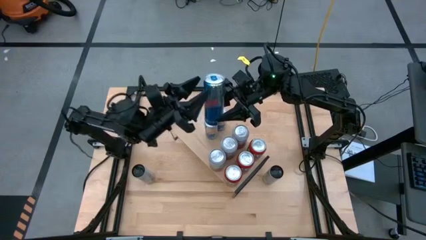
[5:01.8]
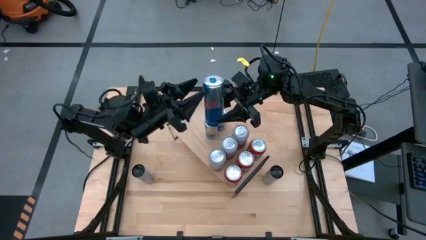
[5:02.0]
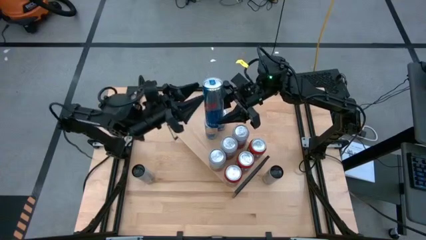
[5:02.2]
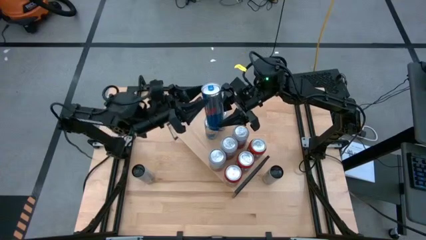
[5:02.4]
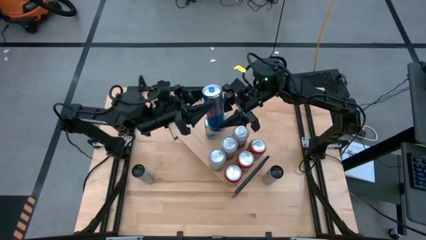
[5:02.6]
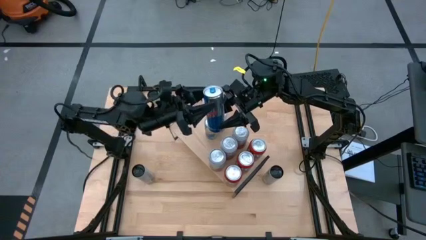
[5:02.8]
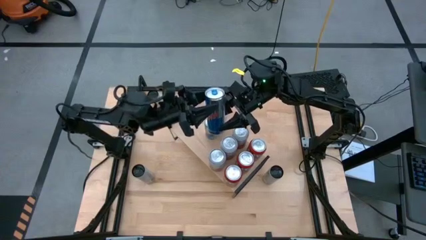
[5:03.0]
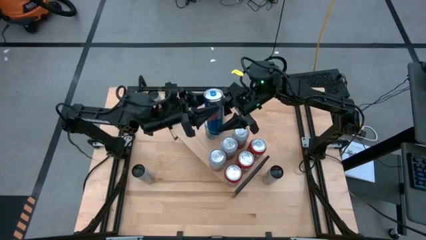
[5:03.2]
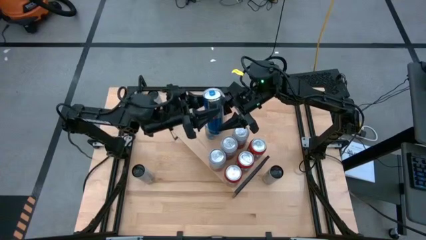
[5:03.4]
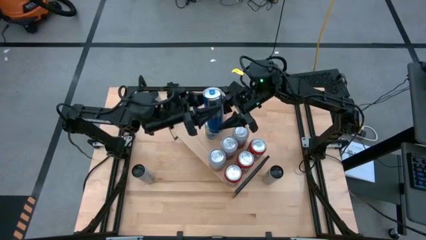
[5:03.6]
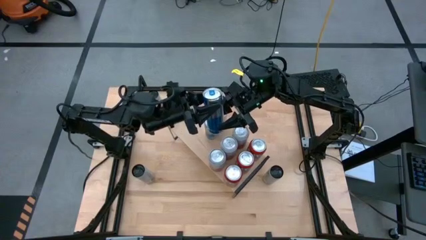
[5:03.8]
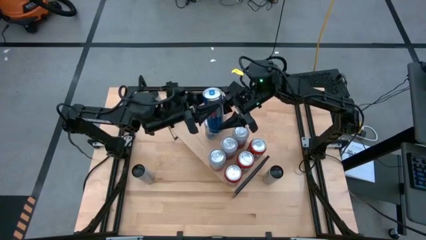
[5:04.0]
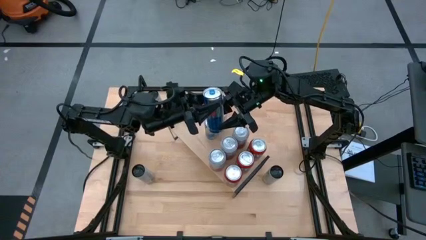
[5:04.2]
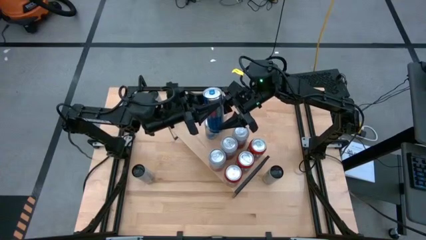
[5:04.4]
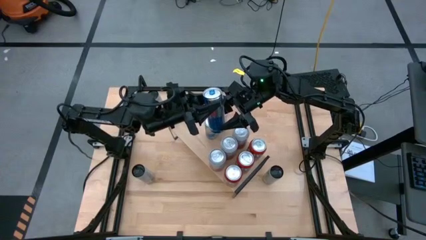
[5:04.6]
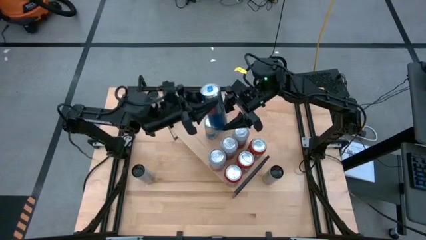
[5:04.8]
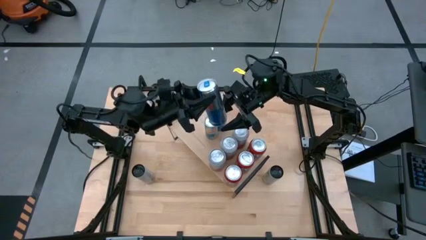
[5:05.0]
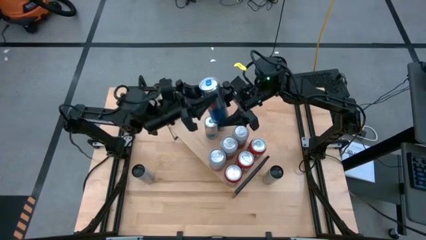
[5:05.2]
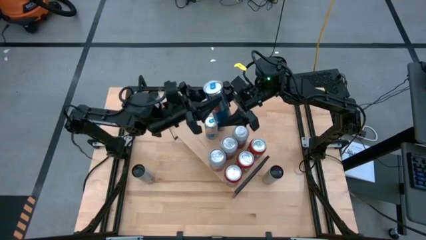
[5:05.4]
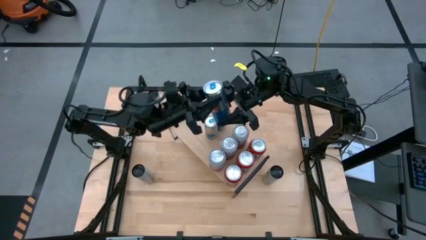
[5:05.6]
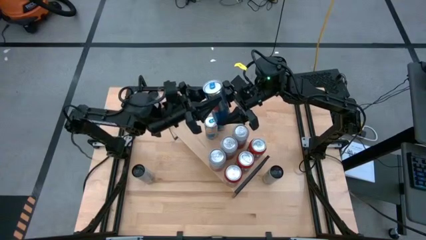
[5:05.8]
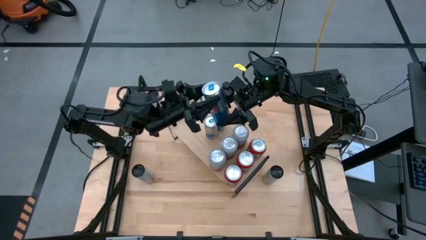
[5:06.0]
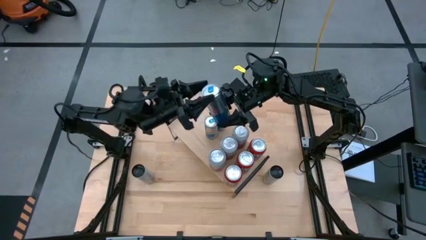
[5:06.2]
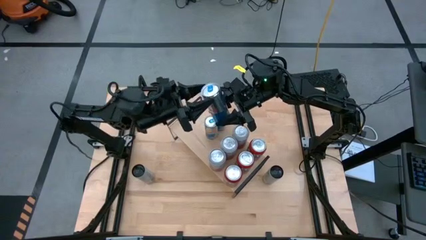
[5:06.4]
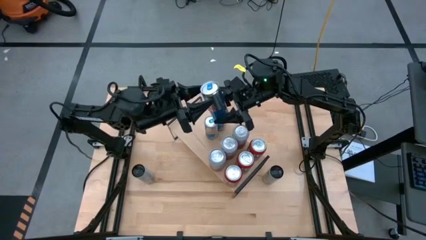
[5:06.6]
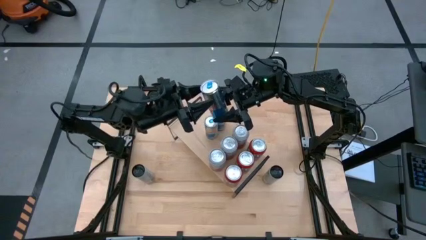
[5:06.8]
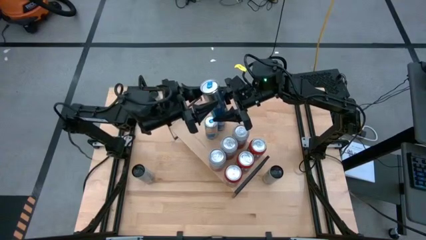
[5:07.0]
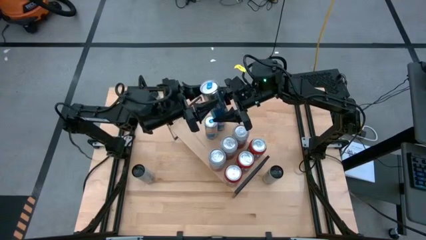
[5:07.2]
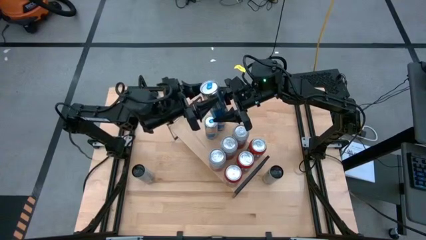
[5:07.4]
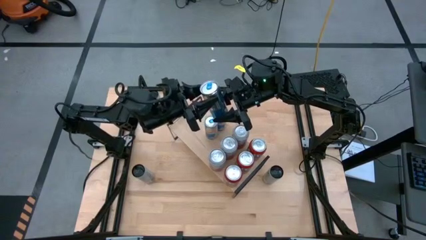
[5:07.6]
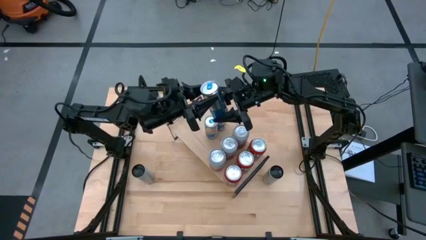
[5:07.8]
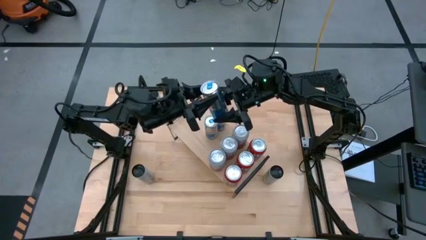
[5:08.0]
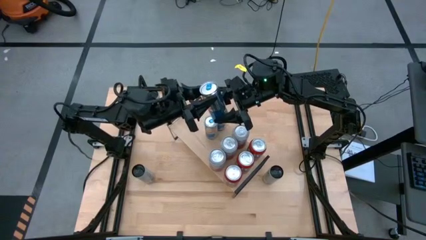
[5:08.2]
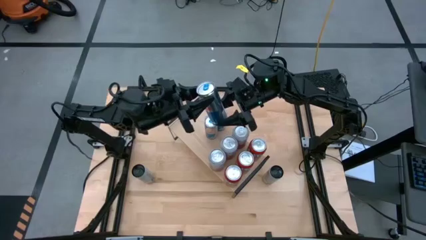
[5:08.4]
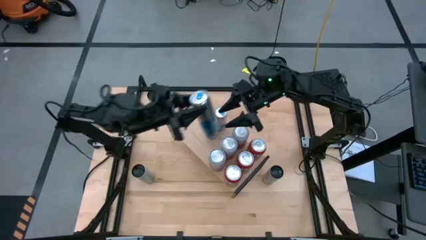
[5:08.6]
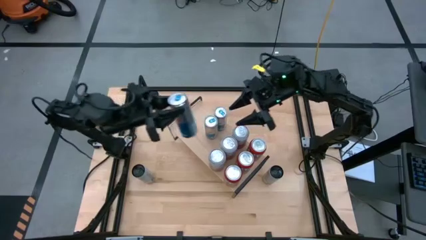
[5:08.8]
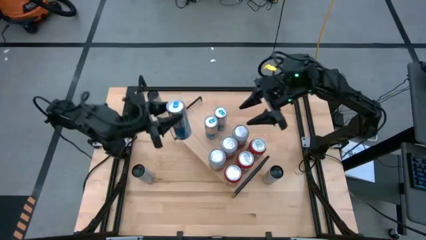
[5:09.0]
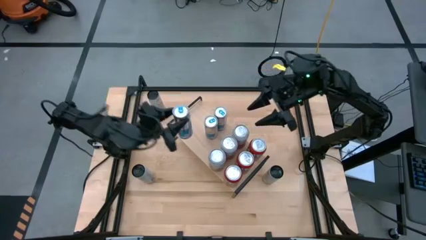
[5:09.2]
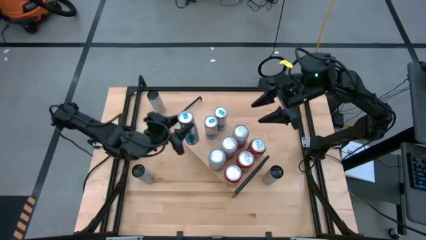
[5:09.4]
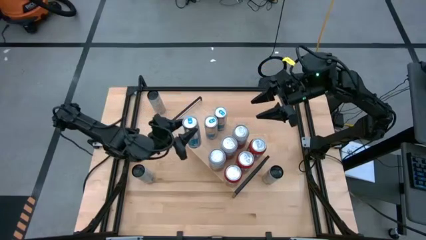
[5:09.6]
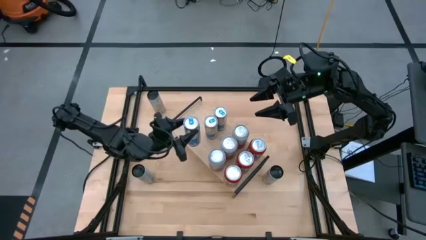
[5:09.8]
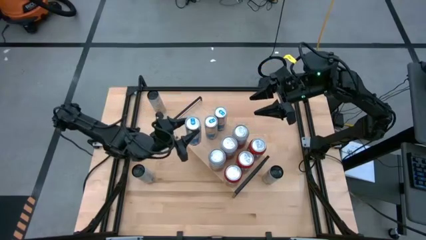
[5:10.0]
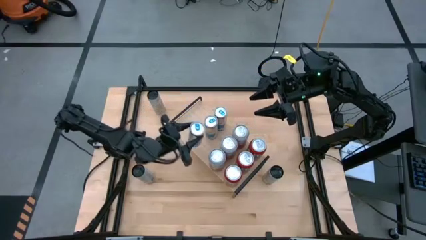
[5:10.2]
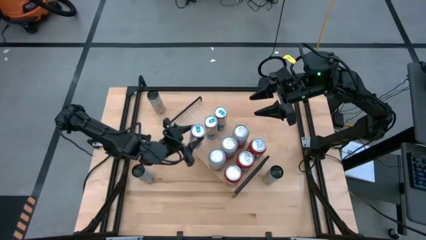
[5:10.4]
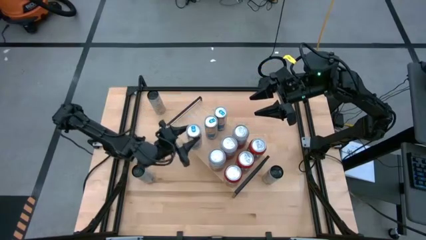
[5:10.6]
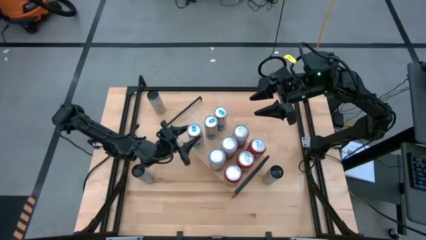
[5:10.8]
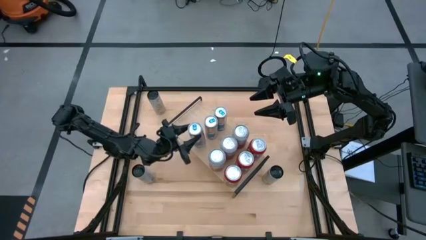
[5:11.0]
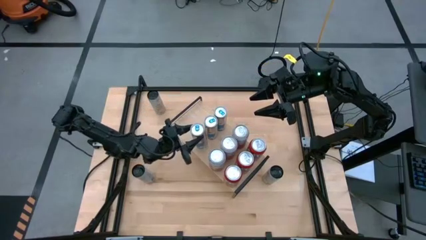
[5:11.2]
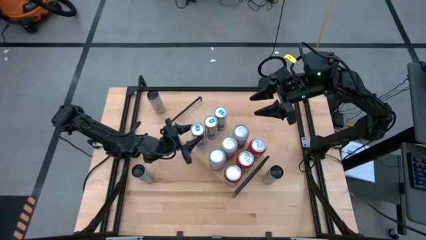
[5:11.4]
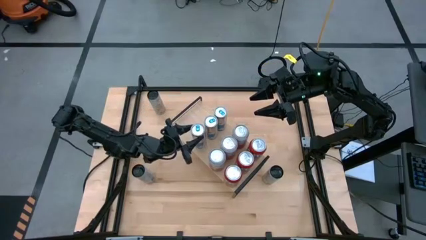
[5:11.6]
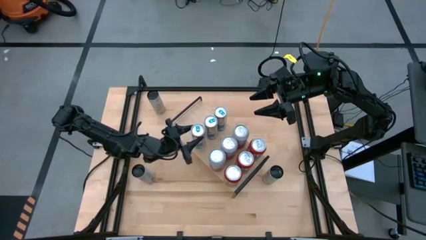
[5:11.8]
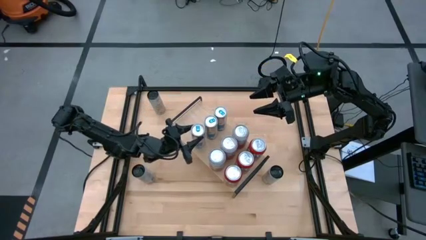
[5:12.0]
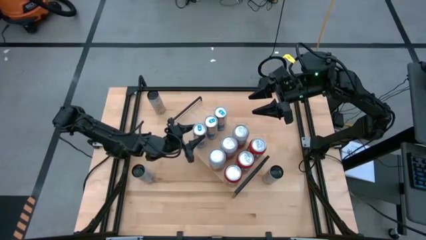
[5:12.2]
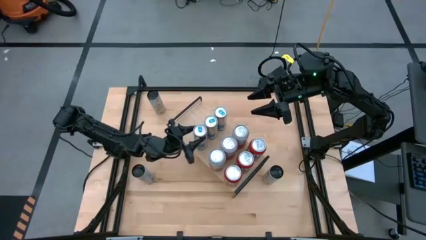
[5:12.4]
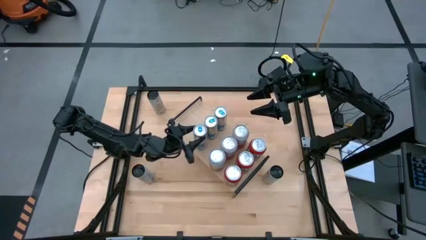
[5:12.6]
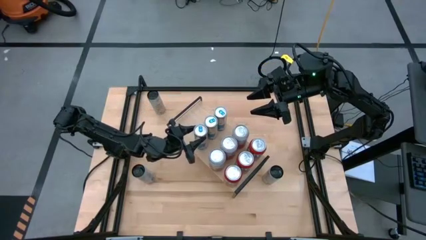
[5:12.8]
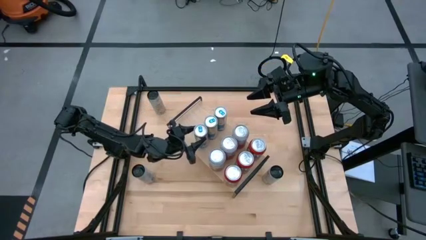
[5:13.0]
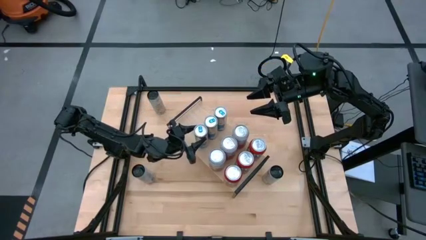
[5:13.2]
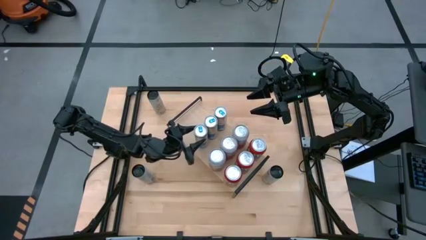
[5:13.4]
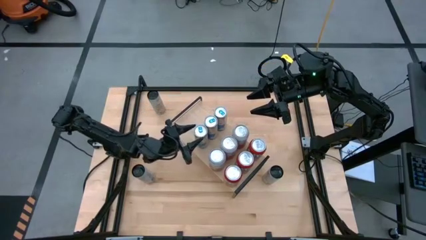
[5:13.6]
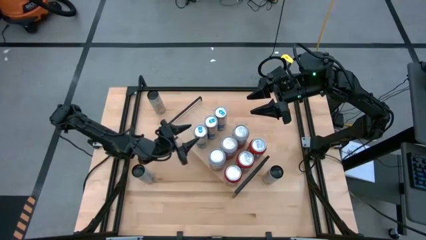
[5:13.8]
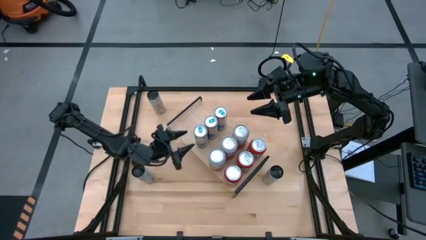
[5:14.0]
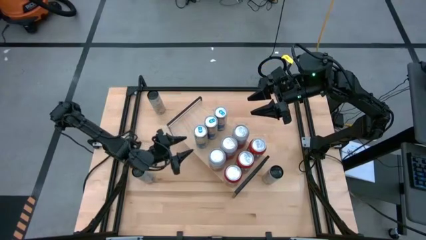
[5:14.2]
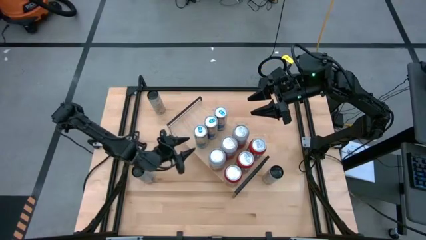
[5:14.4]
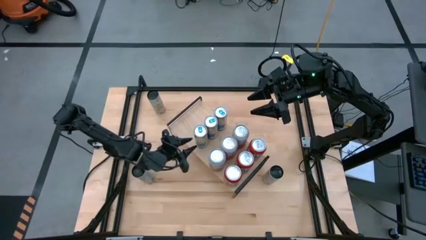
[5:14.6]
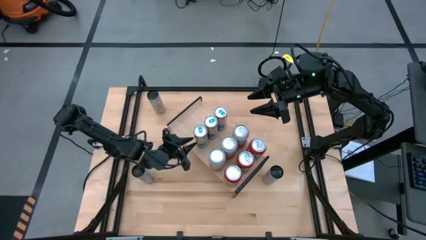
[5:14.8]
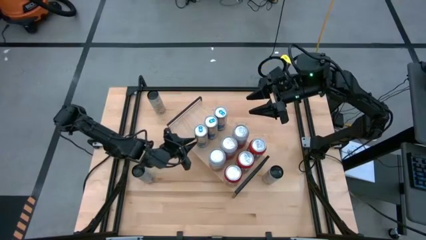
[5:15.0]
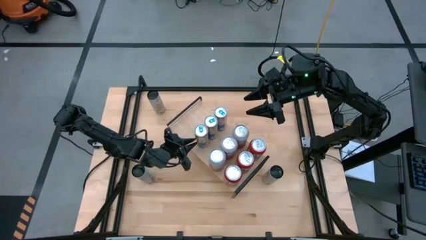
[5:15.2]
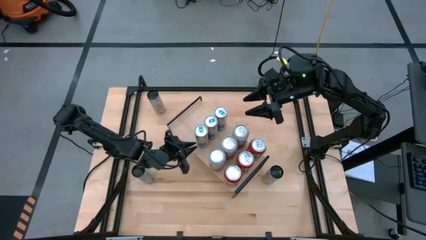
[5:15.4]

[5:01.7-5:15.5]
Task: Place canned beverage on shelf
Put the blue soda can on the shelf aligned with the other blue soda can

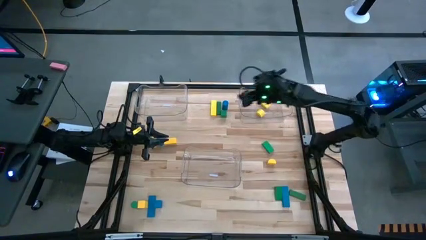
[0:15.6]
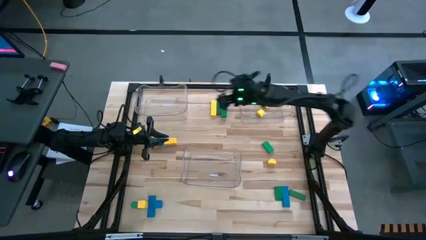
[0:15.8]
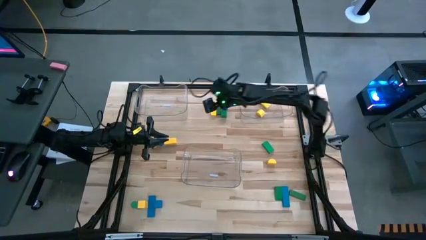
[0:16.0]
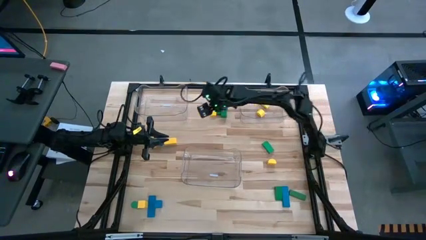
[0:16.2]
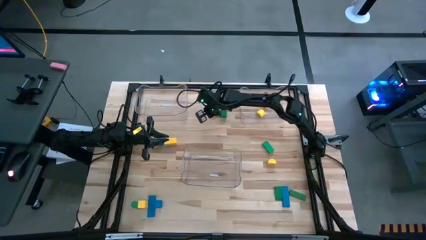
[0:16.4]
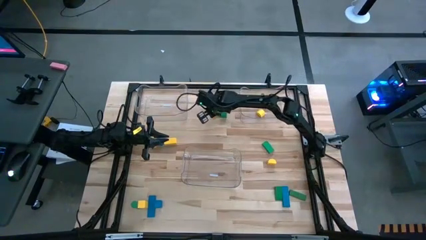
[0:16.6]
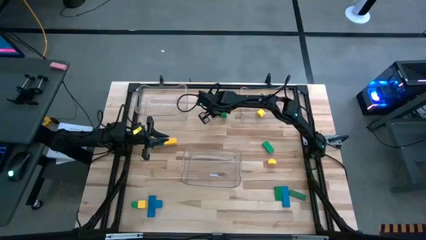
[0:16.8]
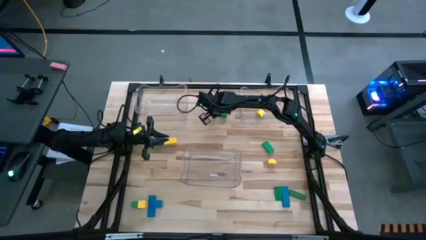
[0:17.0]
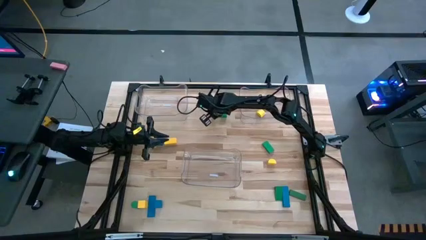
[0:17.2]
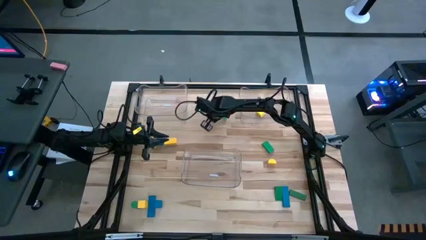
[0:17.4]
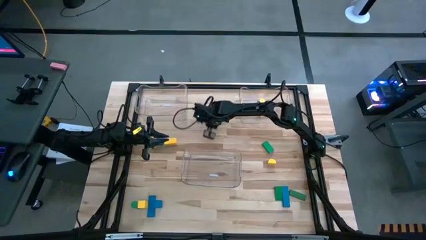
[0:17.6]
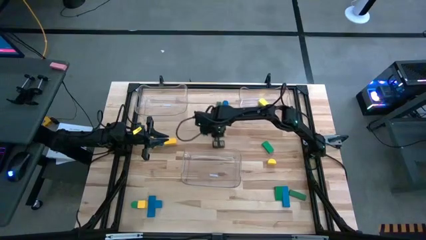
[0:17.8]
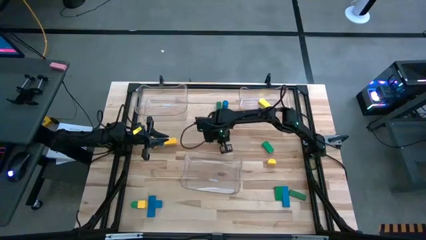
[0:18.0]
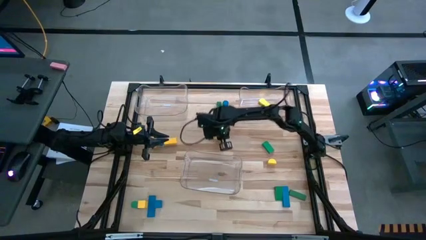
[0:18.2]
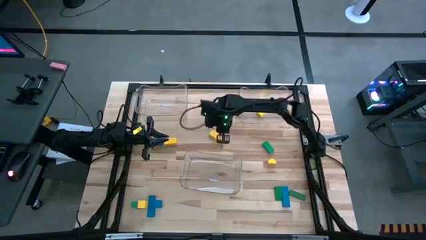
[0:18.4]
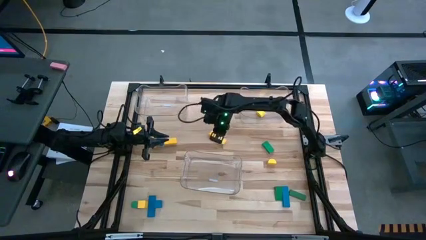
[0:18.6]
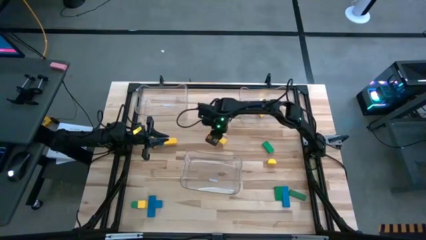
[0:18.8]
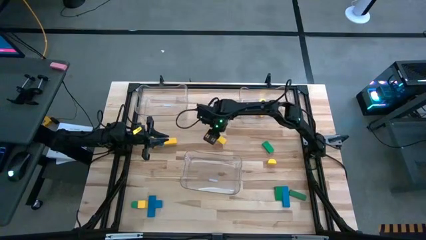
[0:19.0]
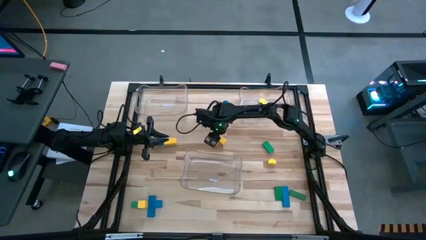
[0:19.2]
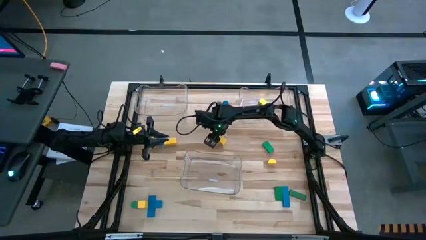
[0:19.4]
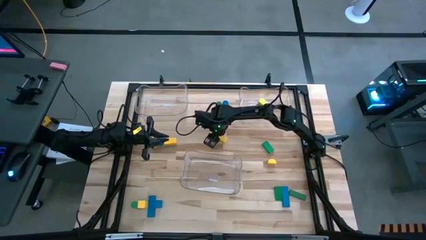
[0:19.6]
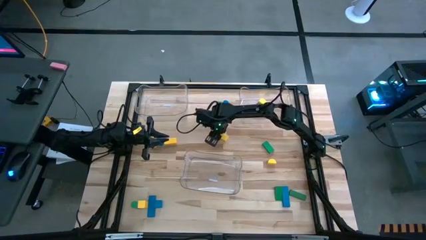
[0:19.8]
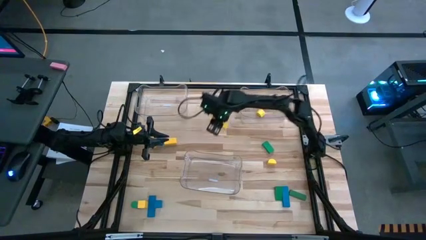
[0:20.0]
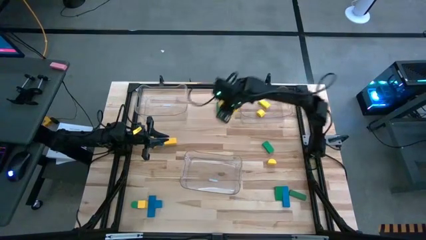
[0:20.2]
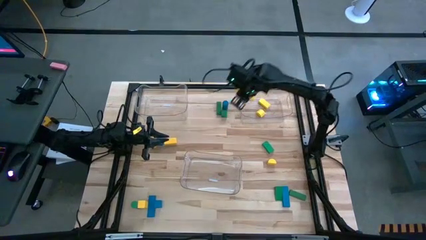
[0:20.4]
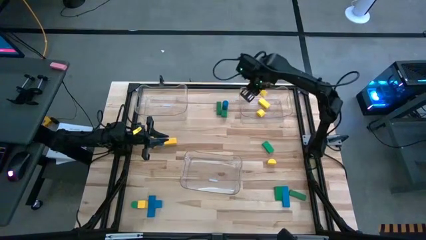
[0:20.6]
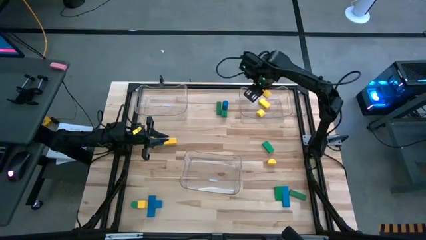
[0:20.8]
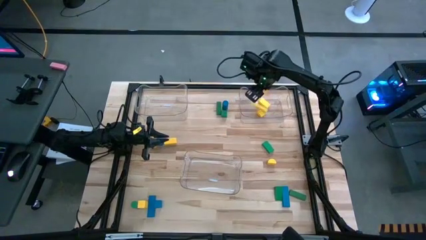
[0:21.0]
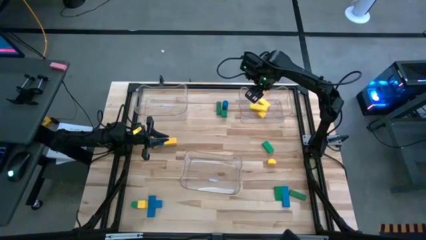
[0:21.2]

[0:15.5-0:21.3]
Task: Sort blocks
Put the yellow block into the right transparent bin
